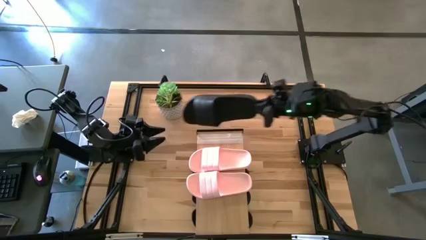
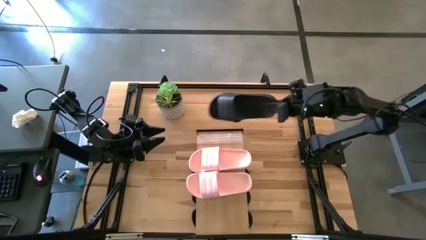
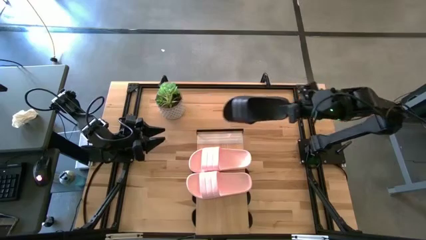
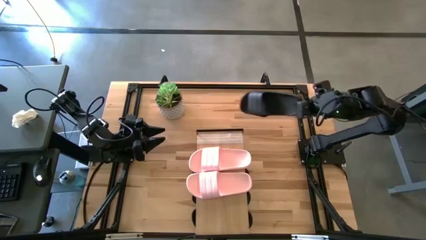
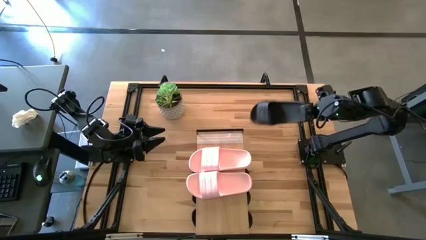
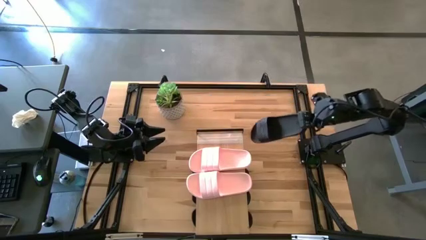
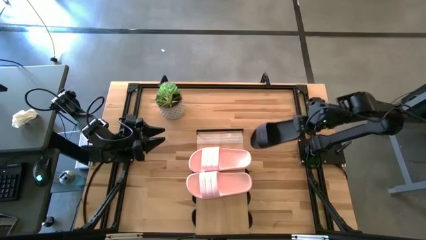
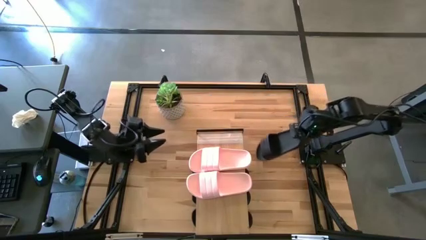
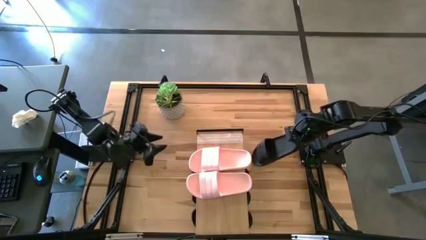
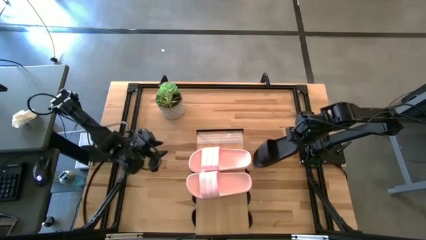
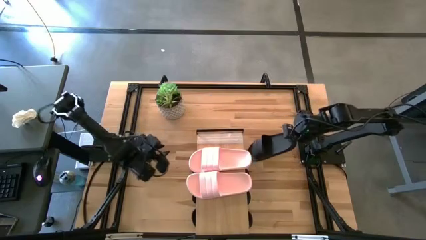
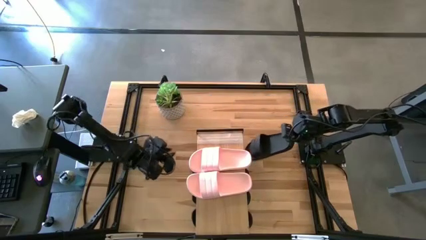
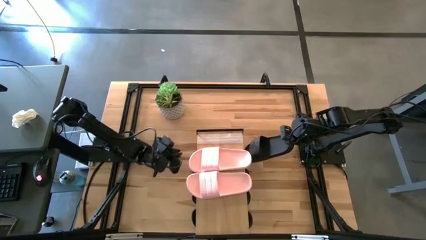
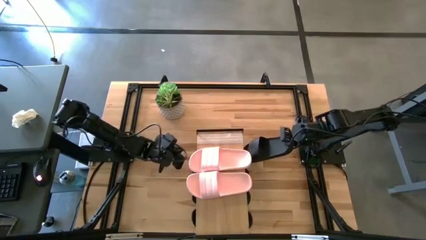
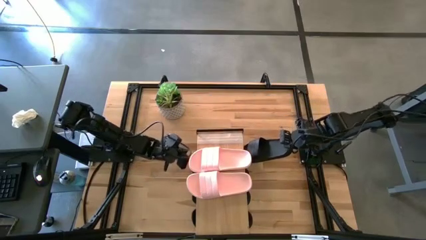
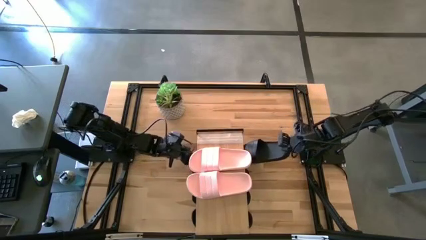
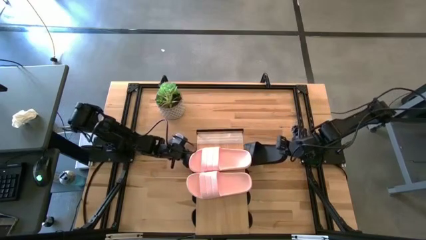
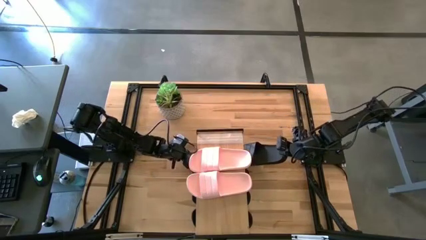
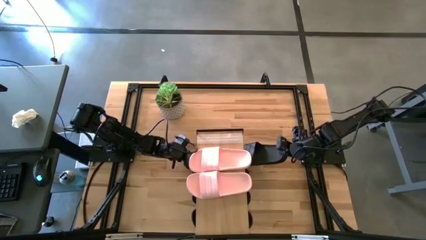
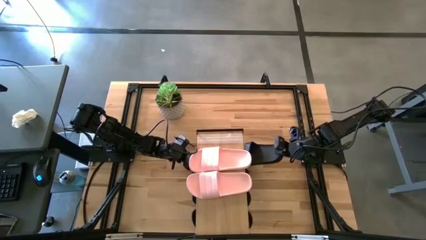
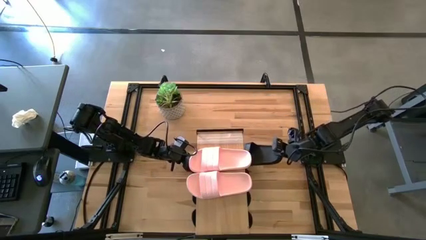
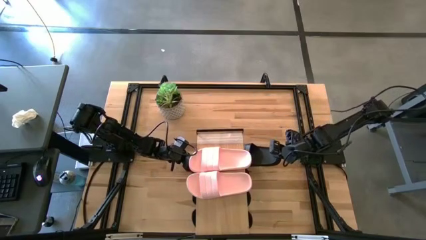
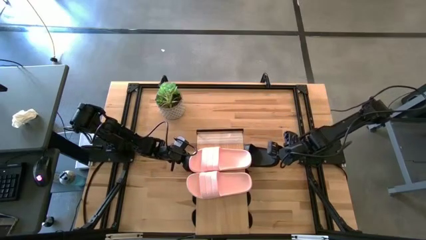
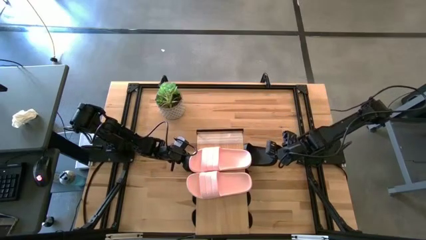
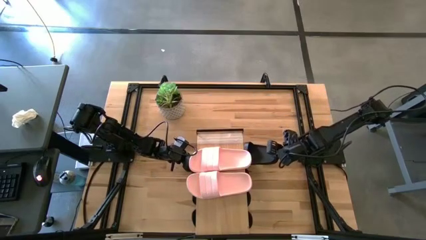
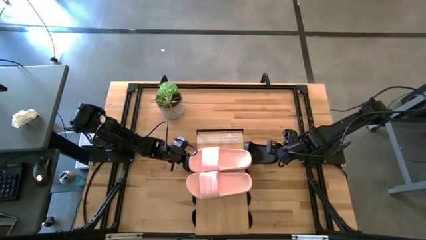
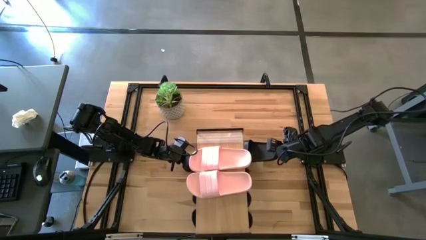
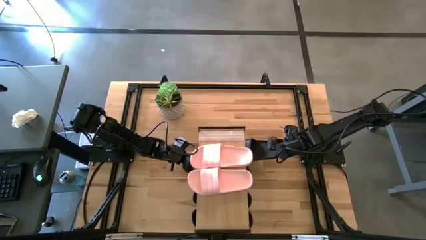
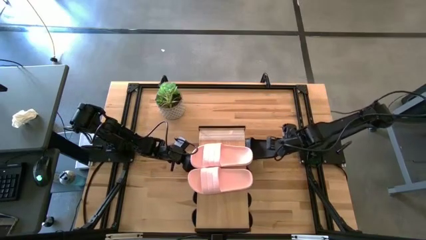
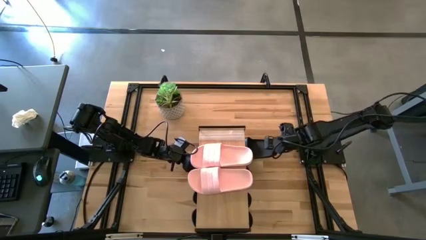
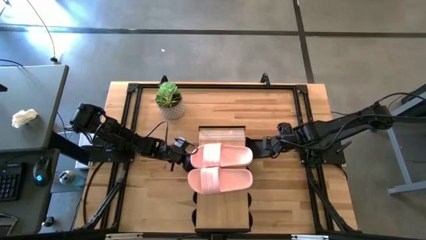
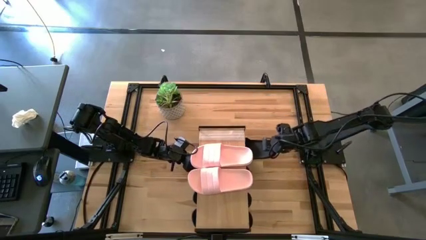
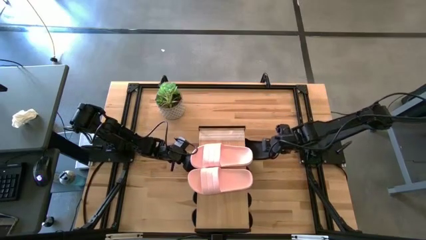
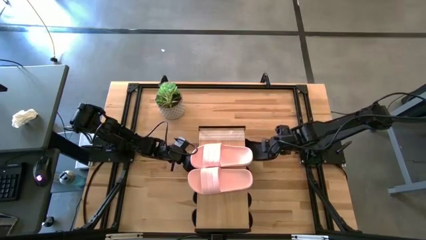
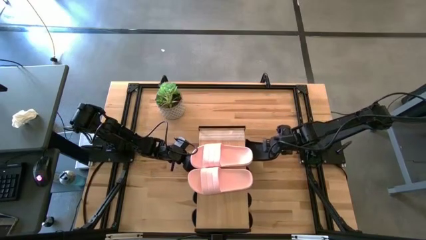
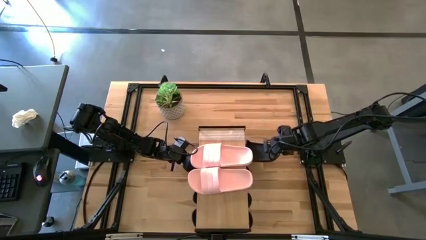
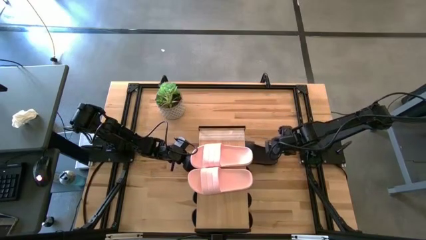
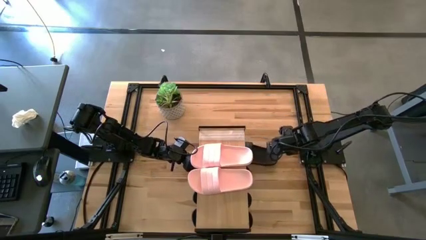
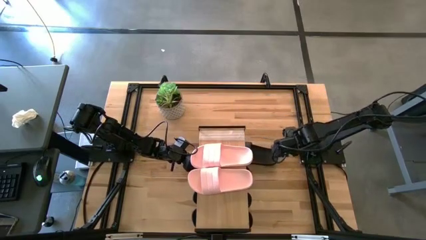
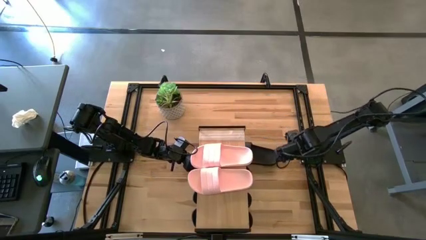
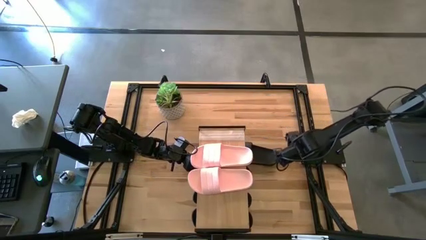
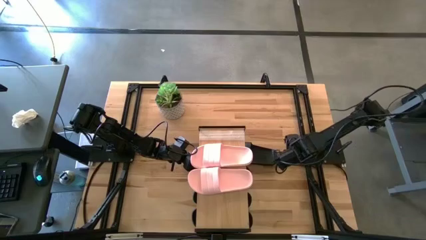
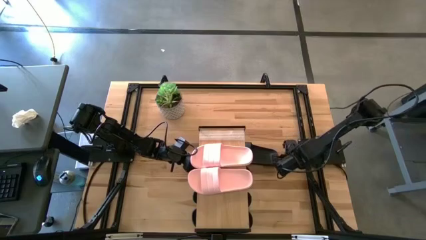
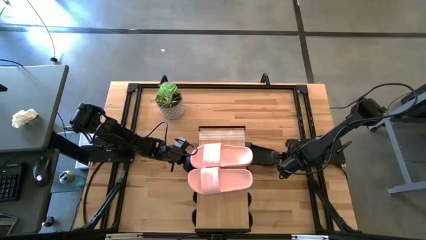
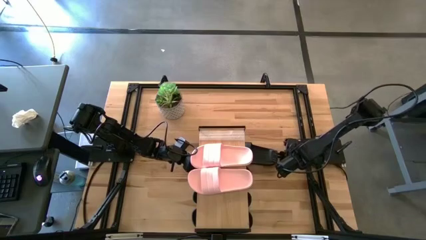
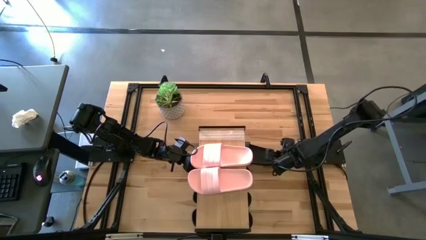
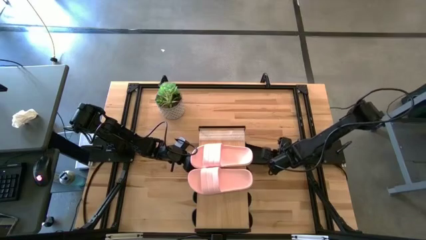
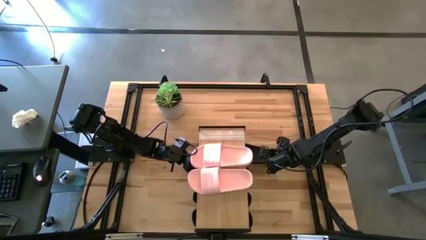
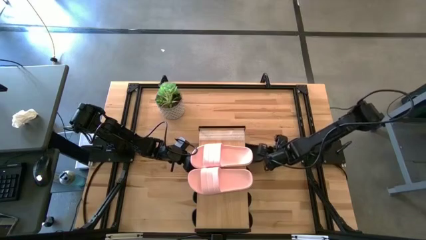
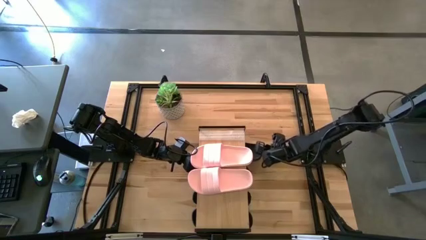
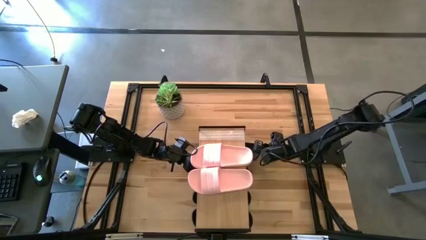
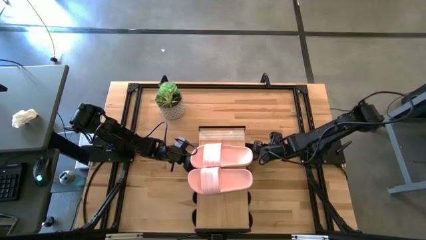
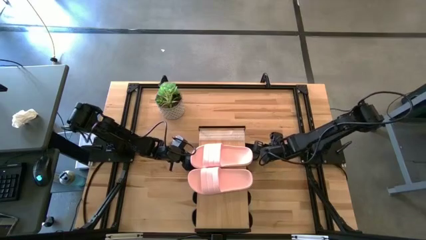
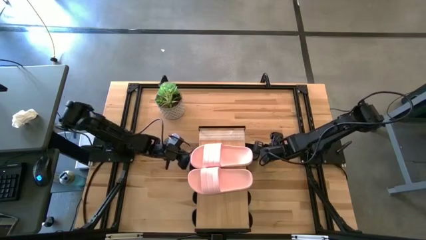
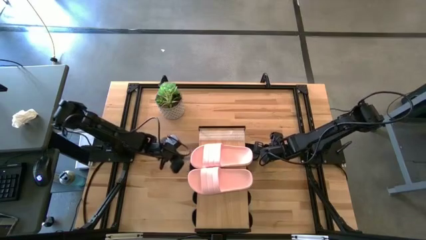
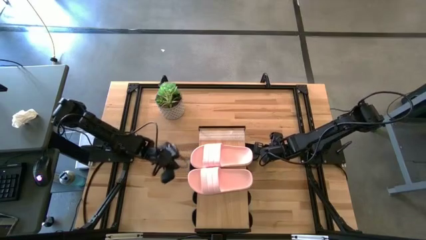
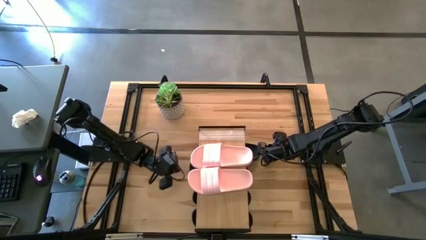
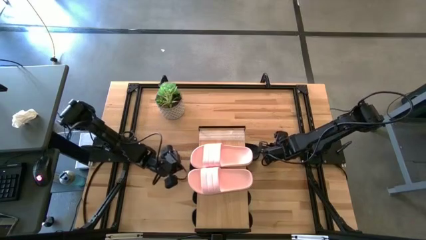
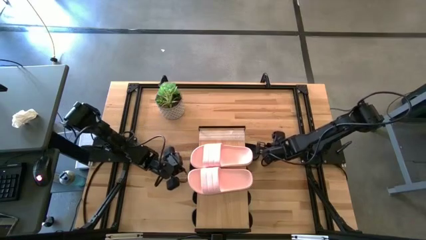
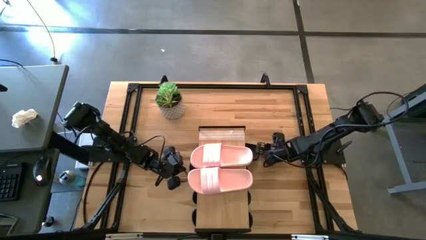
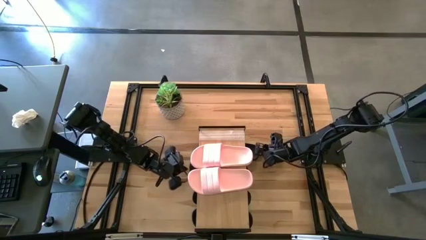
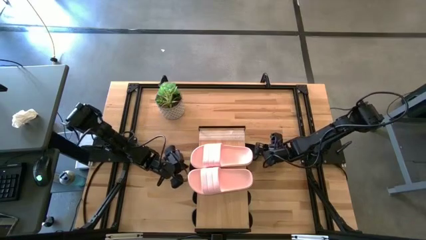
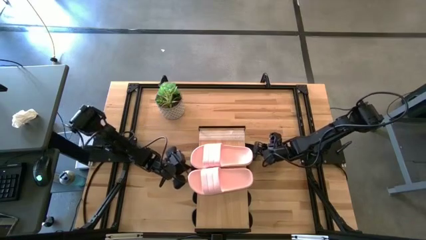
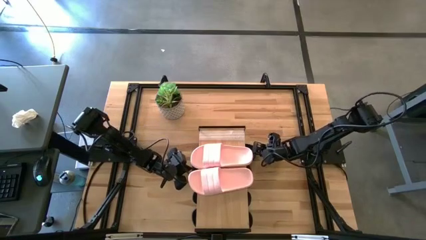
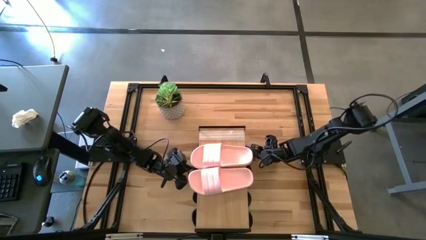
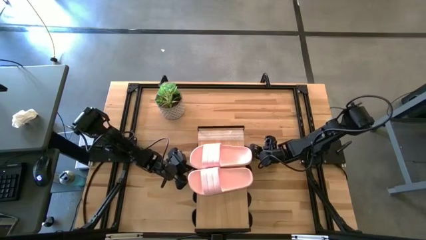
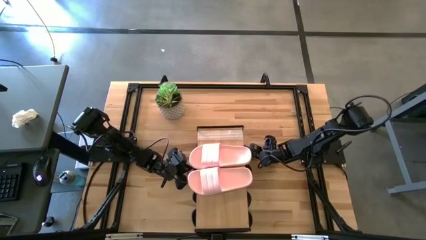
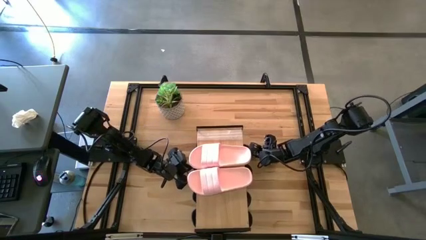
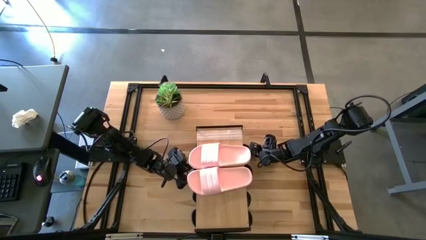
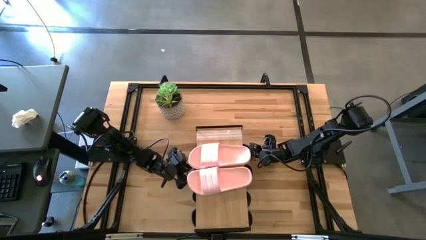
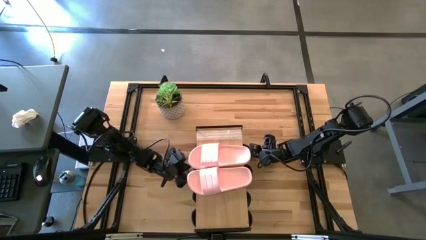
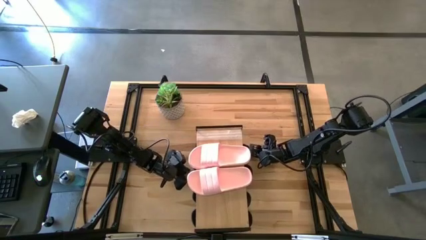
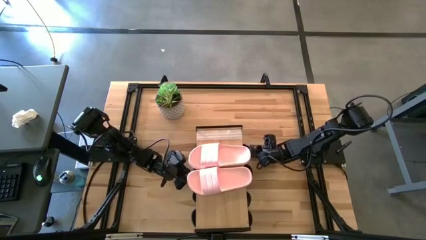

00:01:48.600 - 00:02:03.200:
Task: Pick and place slides into the shelf
Put the black slipper under the shelf

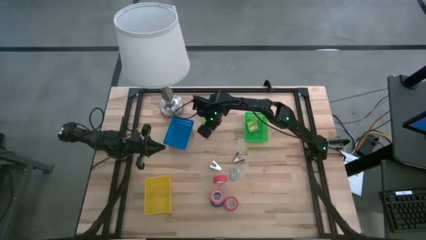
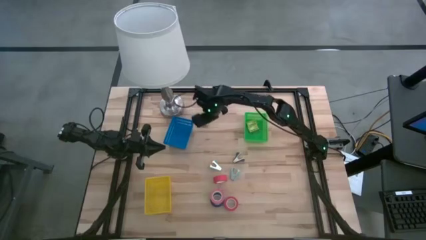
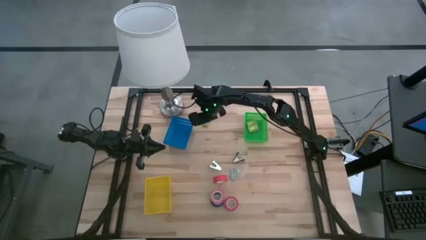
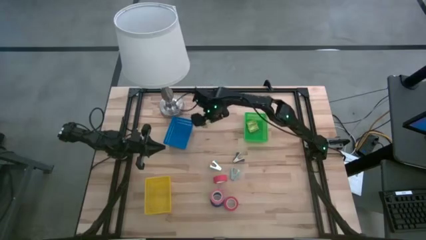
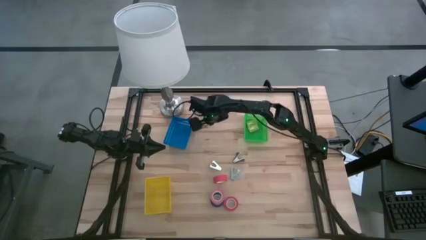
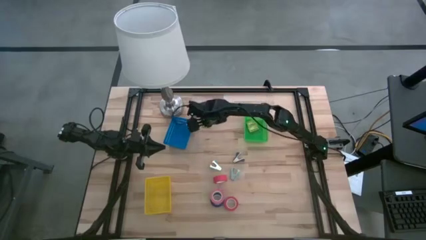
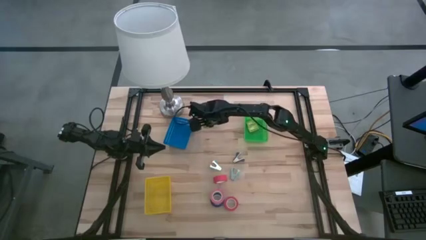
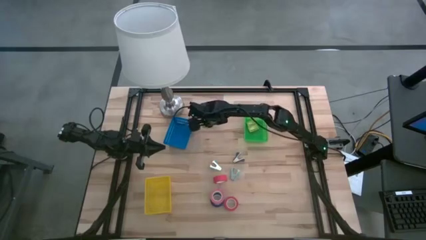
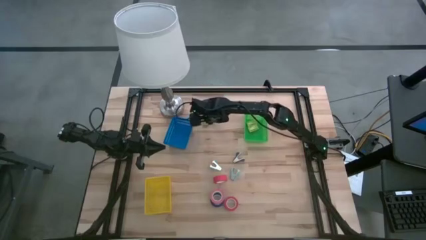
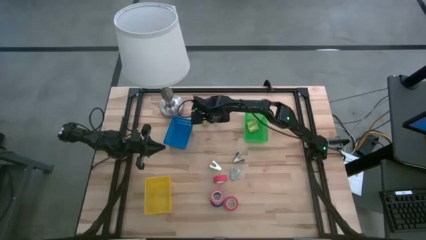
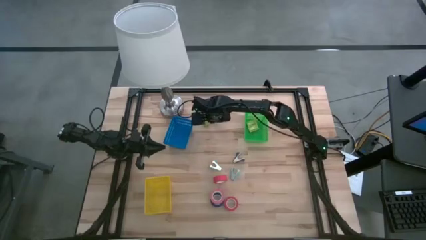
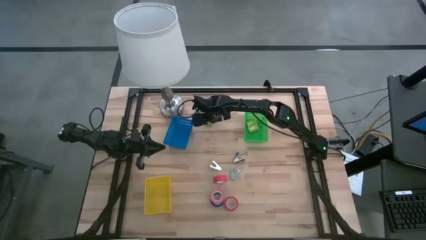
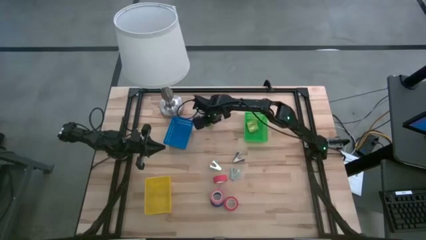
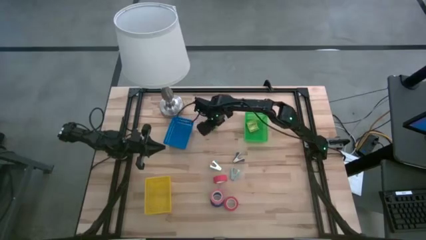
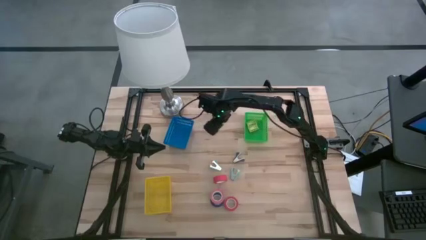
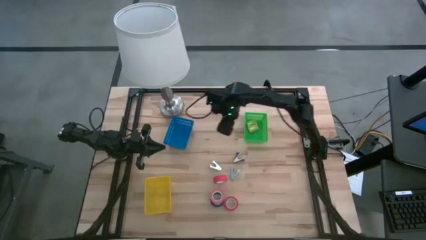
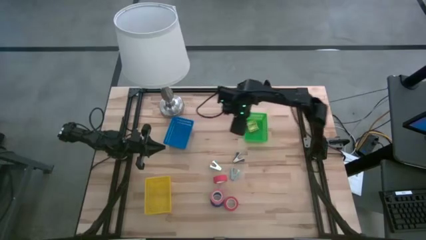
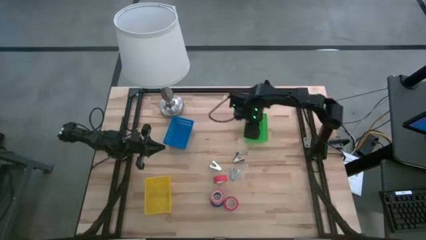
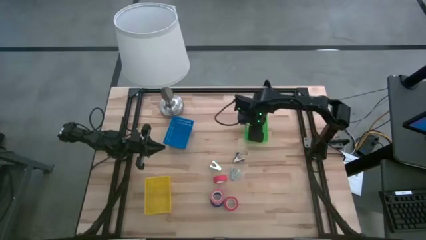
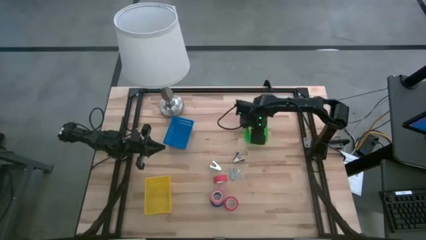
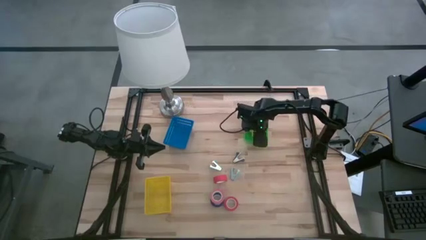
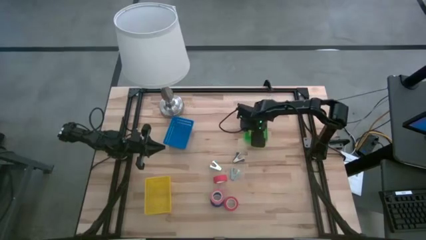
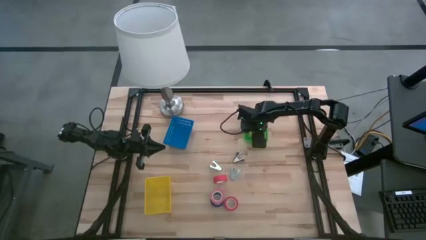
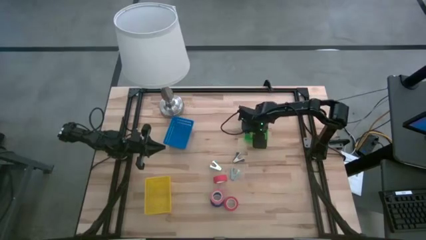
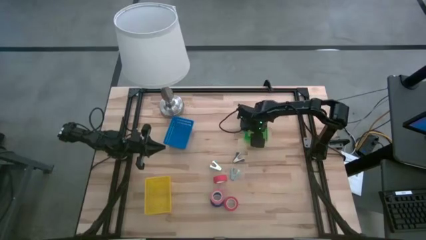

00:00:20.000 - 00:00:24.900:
Task: Pick and place Stapler, Stapler remover, tape
Put the green staple box into the green bin
